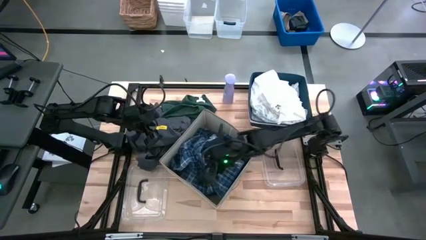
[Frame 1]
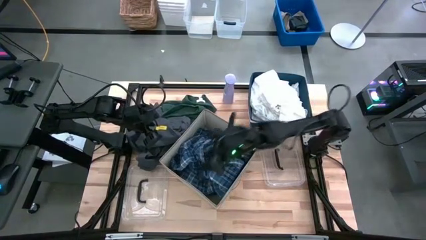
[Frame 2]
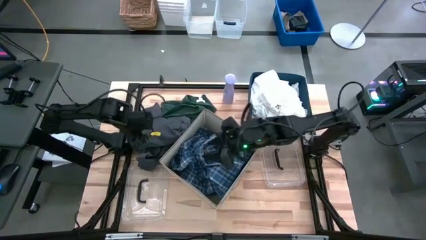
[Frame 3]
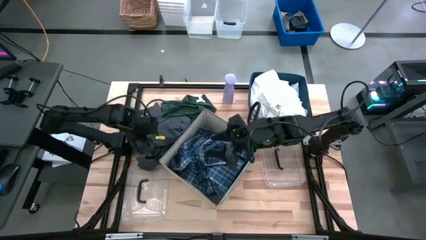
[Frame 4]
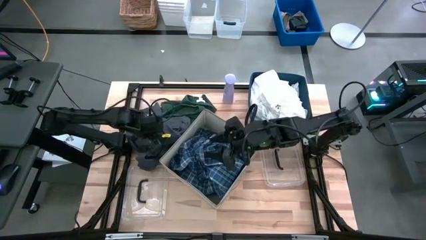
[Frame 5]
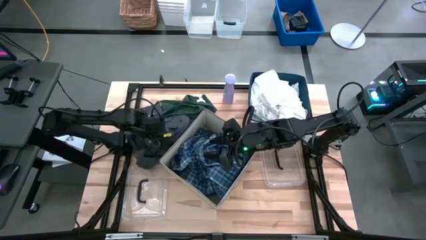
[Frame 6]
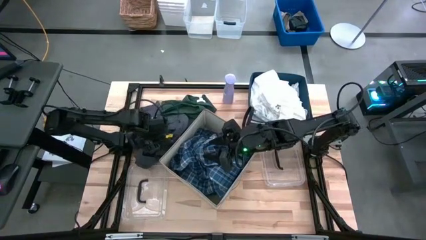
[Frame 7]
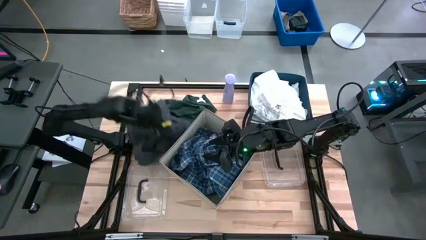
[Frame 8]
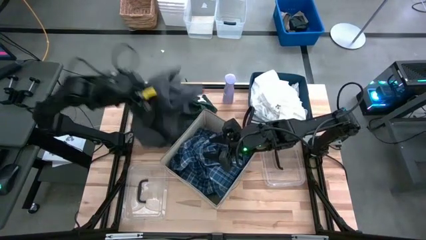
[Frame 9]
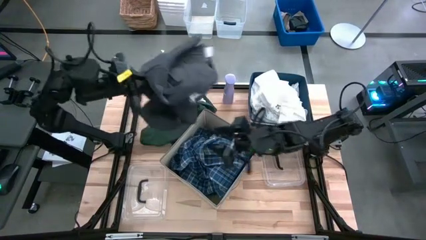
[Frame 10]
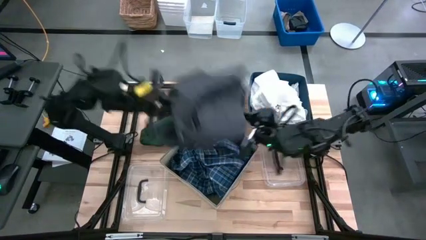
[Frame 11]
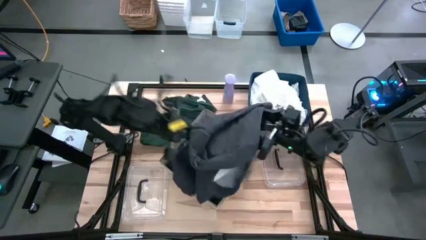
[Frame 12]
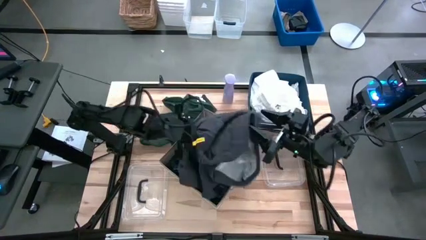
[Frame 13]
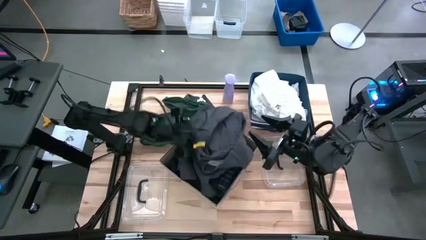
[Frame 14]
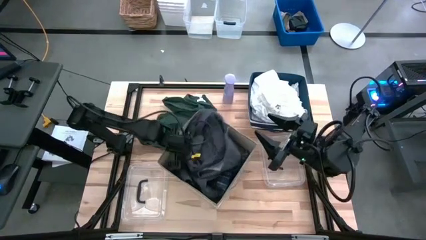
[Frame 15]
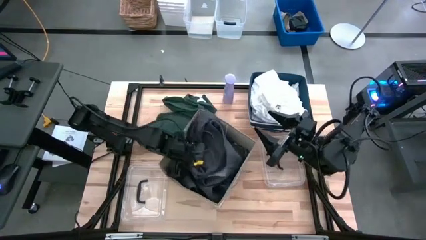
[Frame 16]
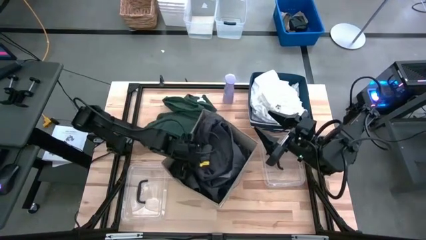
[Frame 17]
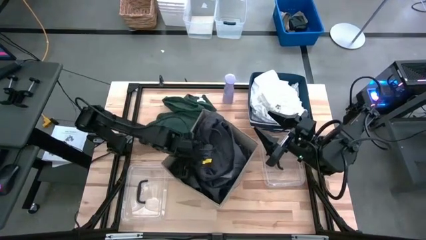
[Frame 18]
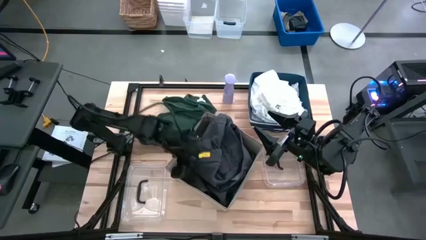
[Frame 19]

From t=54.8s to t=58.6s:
Task: Sort clothes
Put the gray shorts into the laundry organizer

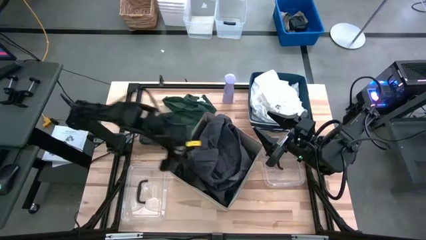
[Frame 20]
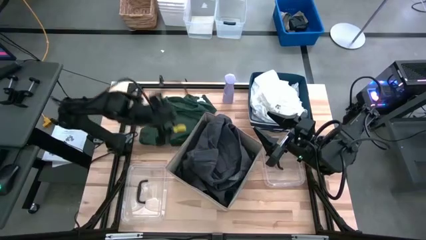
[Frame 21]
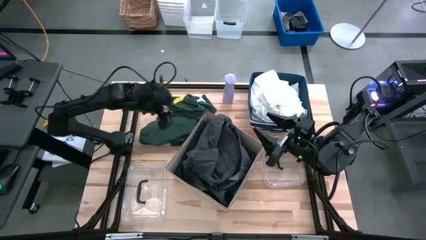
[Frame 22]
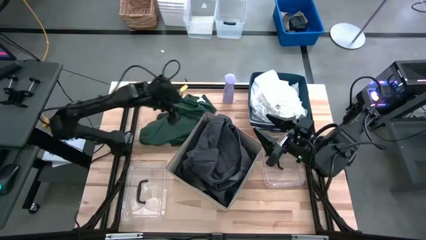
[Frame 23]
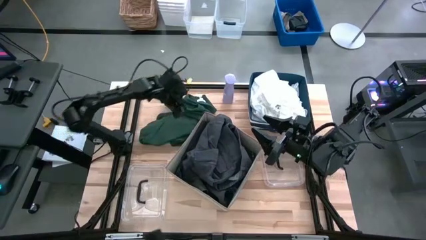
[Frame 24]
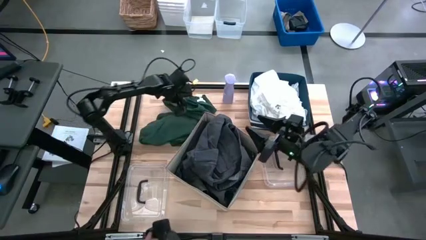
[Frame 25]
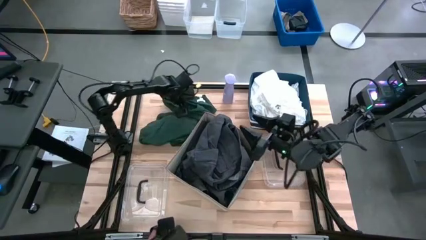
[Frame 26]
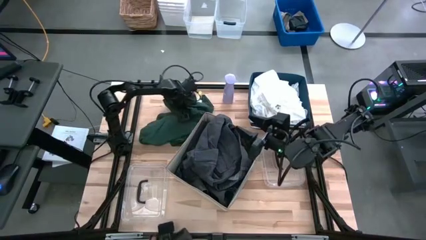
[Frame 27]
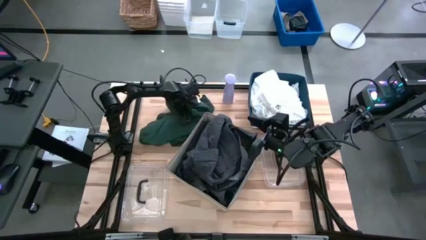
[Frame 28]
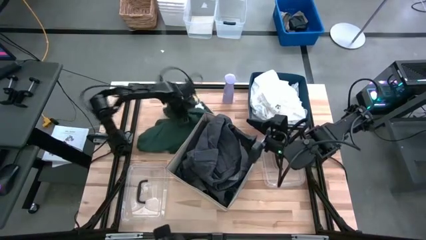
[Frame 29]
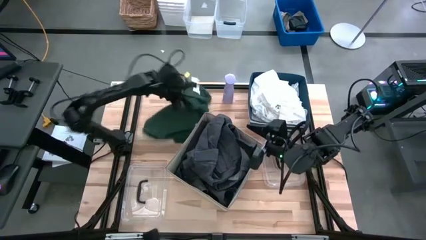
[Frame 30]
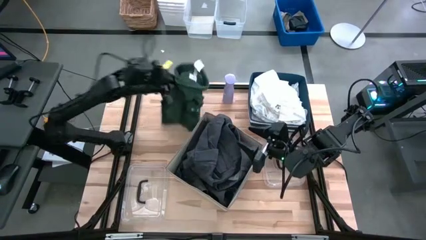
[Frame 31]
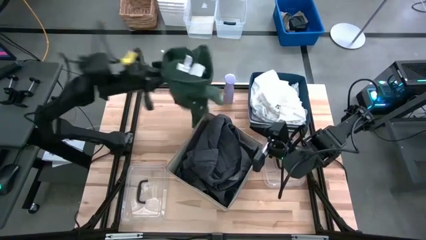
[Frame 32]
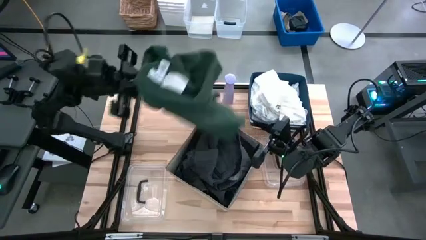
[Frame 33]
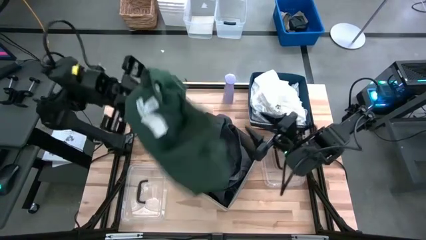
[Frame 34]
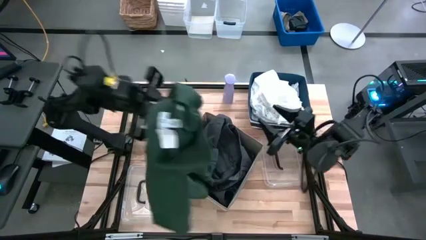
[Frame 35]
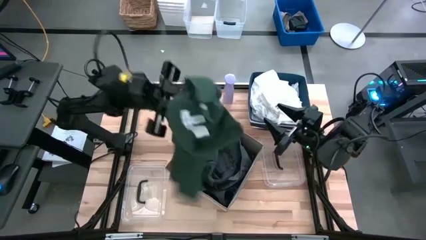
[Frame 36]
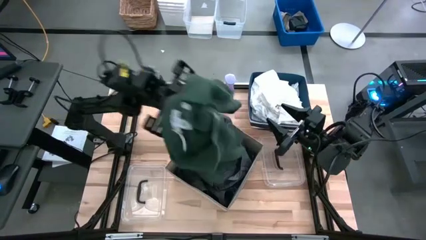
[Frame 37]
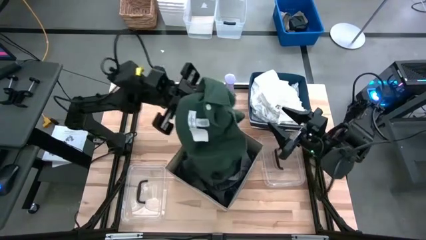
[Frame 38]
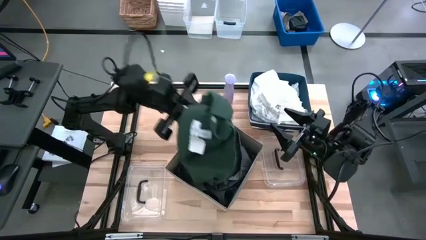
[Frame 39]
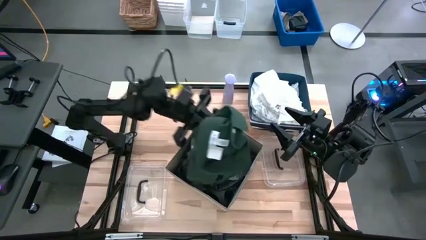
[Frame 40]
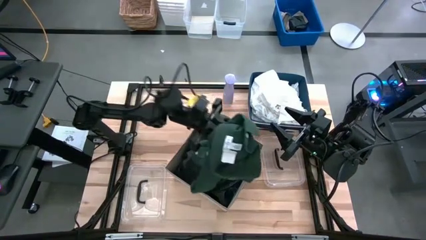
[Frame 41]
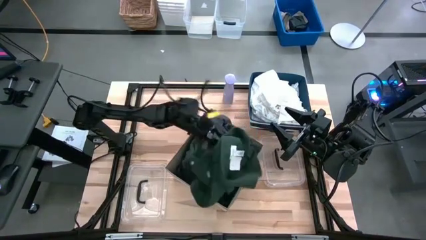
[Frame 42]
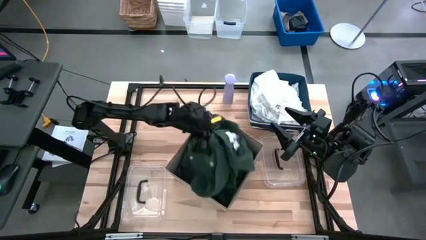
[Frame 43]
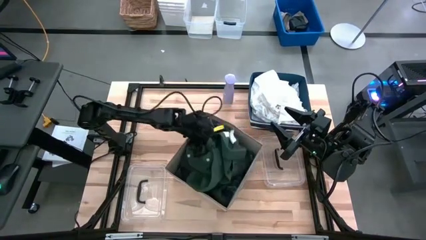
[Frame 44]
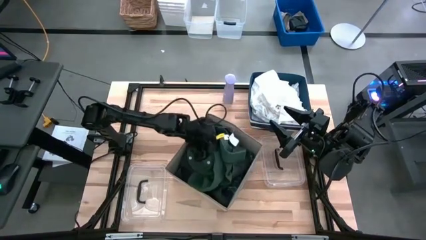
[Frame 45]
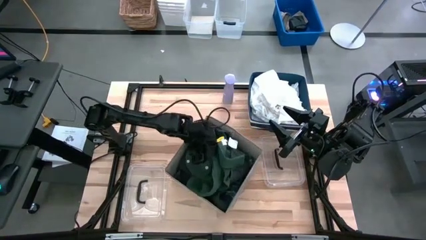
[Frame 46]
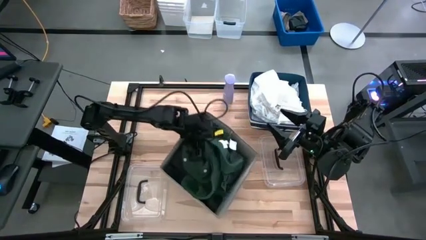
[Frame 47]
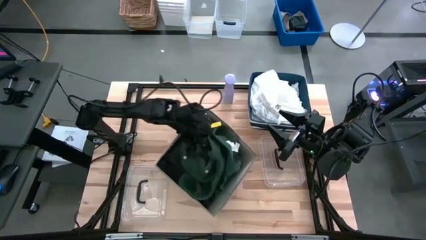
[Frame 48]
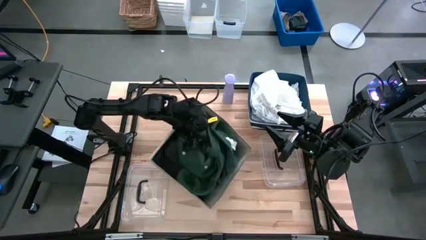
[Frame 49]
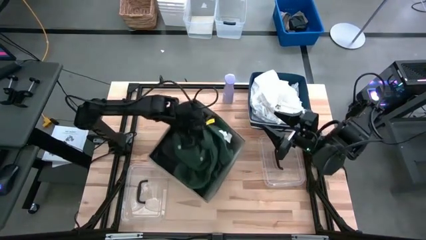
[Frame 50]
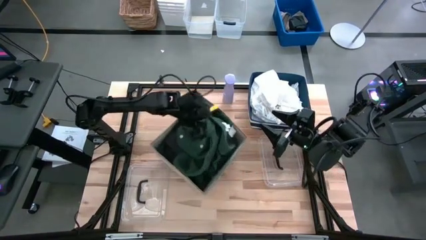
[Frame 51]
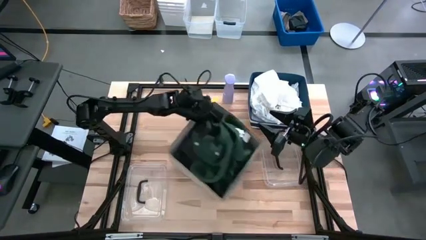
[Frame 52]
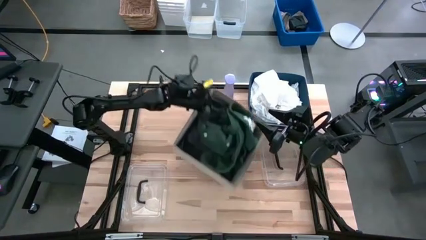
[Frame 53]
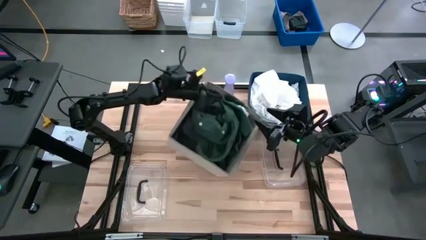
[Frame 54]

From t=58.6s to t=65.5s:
Put the green shirt into the laundry organizer

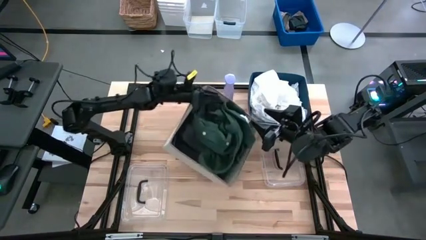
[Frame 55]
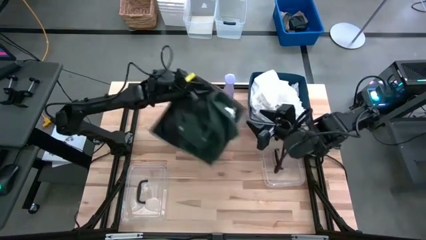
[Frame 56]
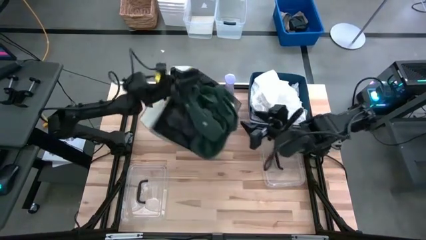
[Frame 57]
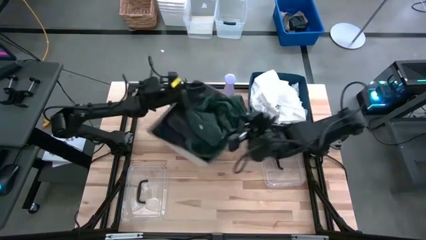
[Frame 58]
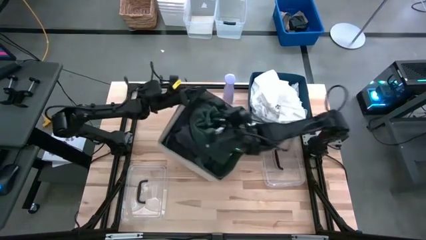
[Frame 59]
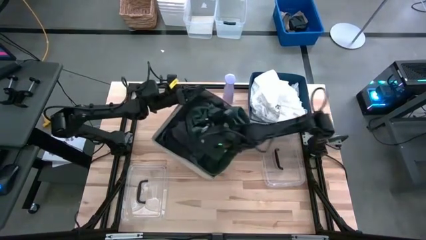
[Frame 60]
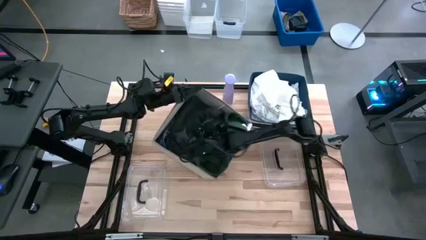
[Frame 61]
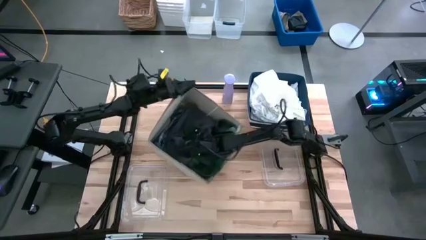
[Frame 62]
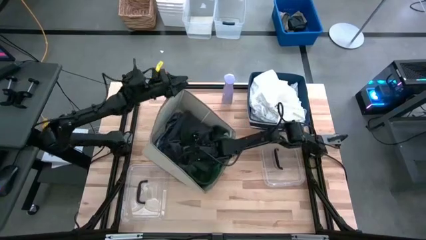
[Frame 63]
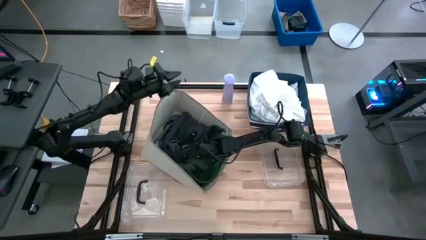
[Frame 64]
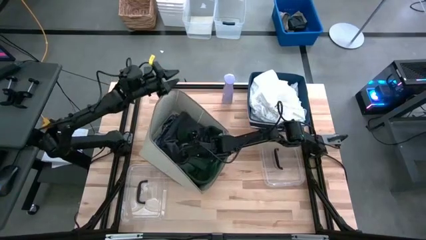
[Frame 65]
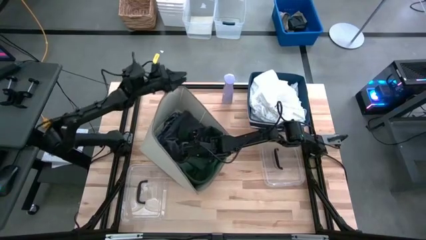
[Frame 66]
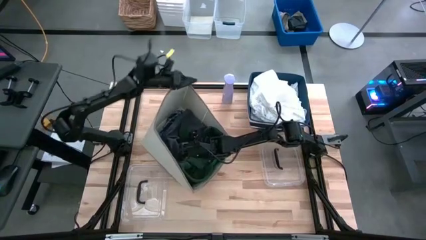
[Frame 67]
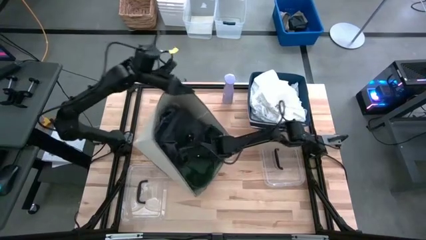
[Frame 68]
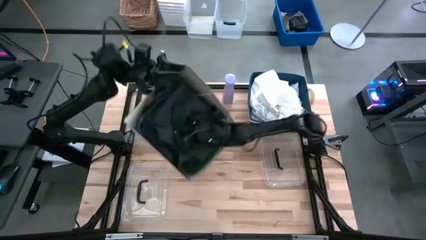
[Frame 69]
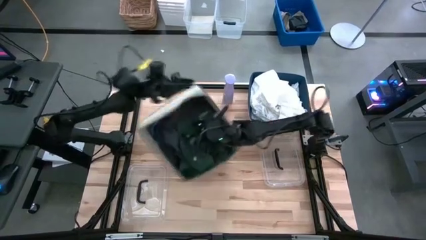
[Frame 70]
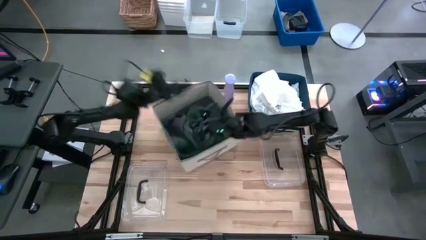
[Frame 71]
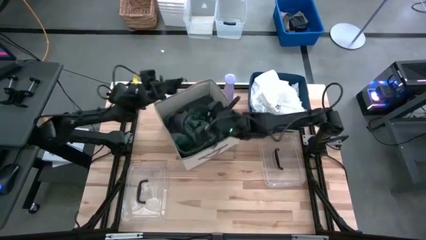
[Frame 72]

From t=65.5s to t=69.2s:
Put the green shirt into the laundry organizer

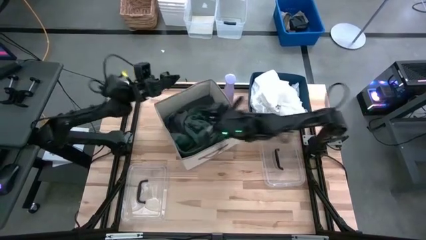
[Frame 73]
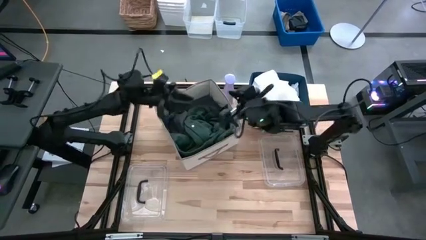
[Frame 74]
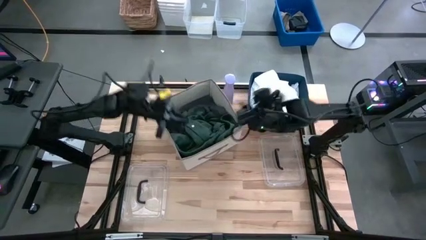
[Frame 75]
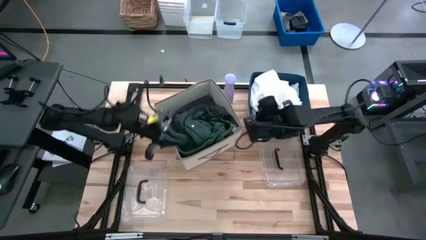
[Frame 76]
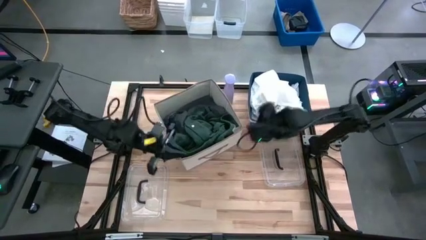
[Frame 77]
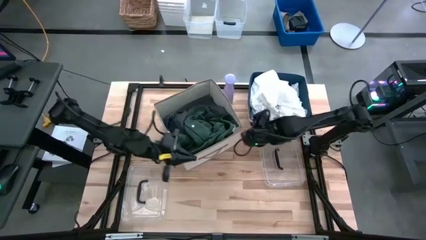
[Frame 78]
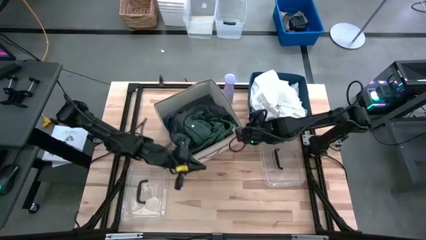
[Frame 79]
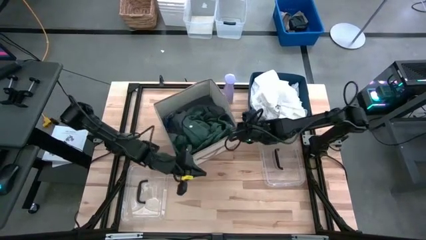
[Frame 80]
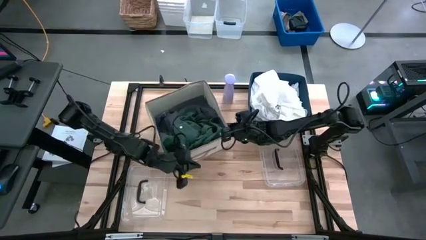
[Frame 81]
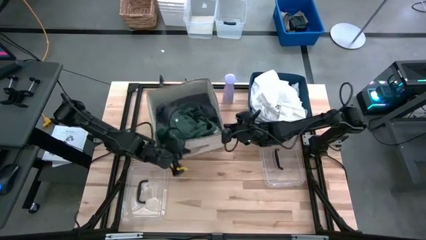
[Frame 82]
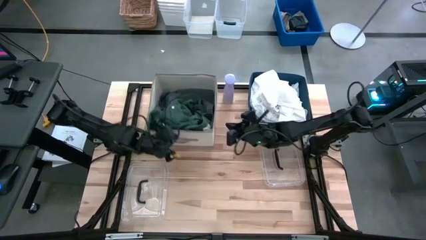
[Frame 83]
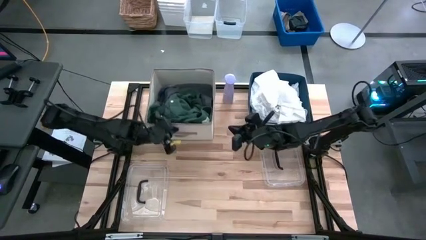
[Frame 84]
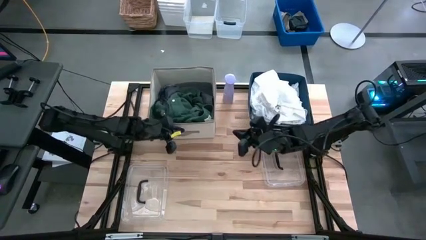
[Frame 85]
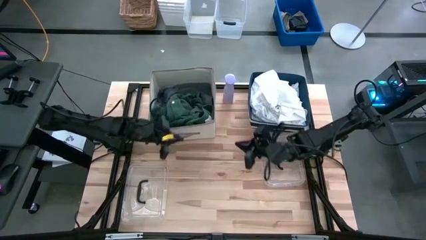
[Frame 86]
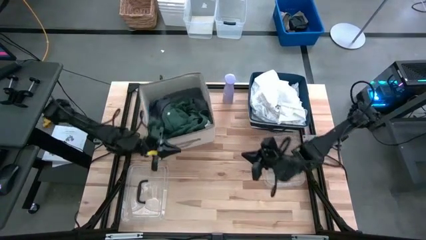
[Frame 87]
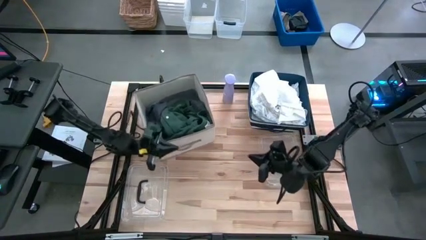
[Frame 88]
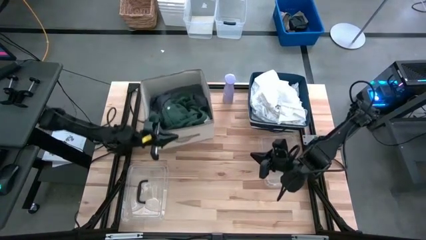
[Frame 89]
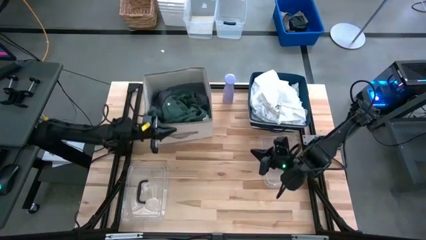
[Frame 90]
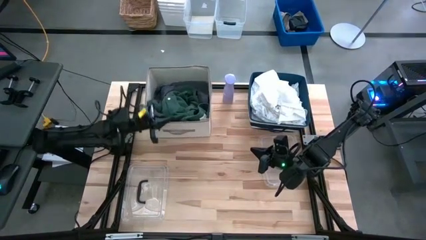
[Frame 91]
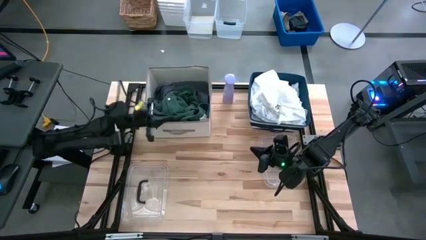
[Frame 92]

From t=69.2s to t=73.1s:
Move the laundry organizer to the top left
